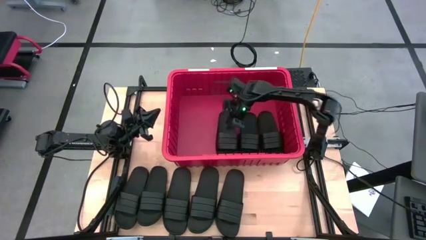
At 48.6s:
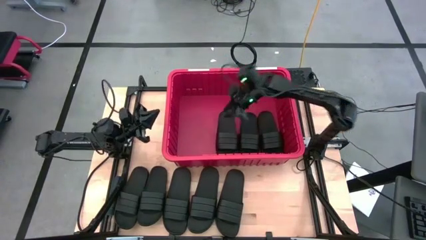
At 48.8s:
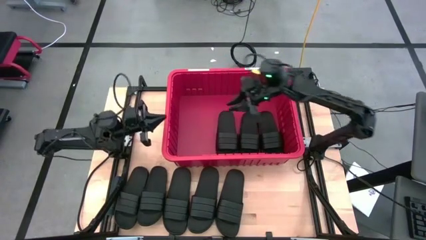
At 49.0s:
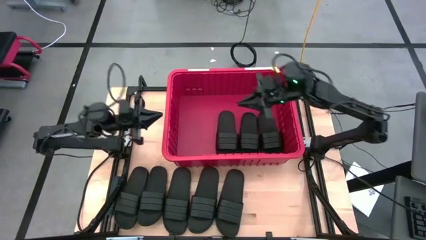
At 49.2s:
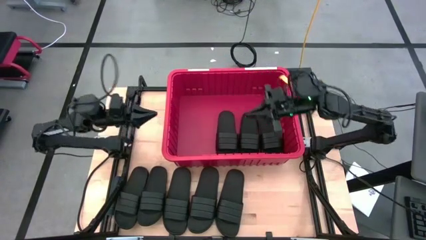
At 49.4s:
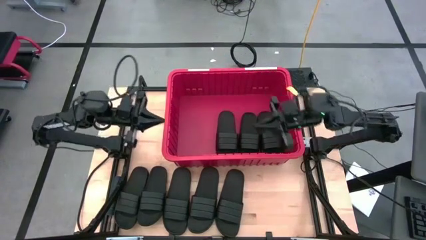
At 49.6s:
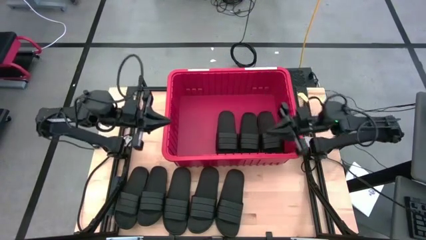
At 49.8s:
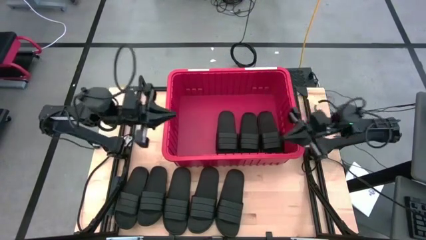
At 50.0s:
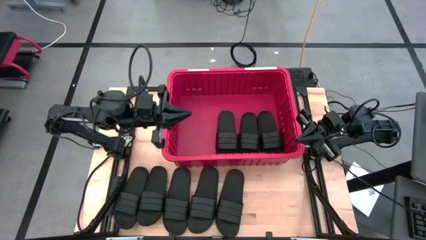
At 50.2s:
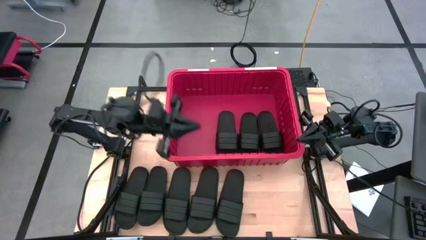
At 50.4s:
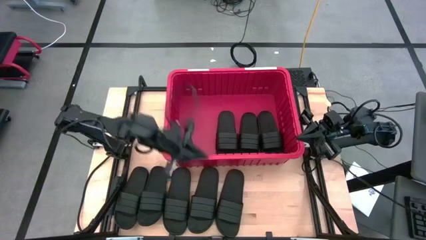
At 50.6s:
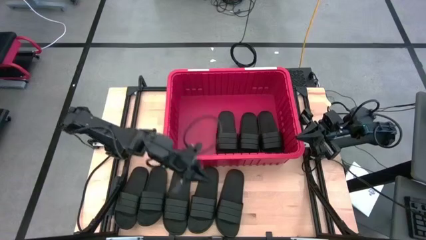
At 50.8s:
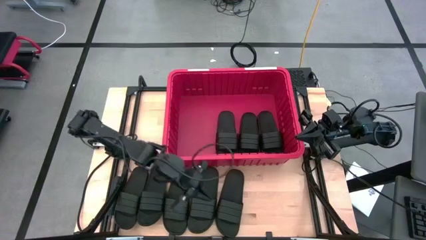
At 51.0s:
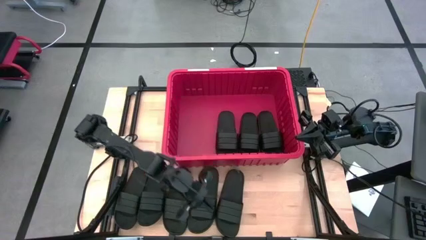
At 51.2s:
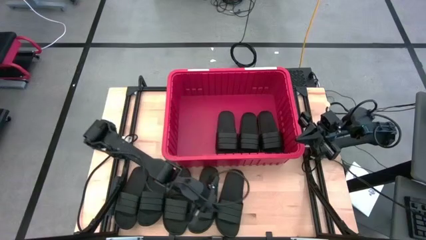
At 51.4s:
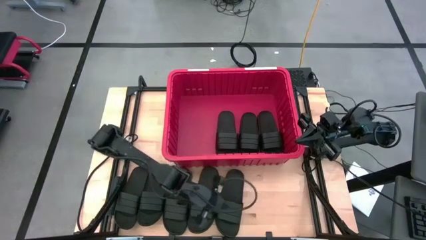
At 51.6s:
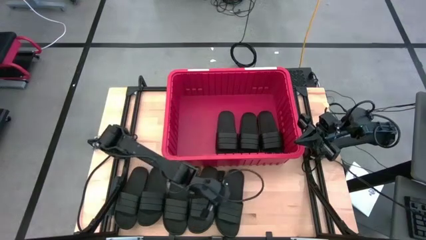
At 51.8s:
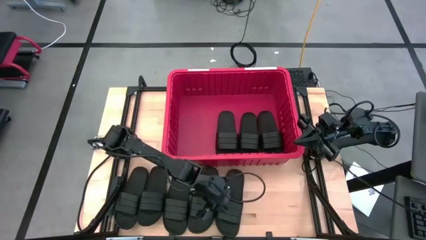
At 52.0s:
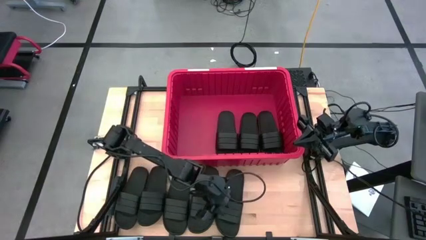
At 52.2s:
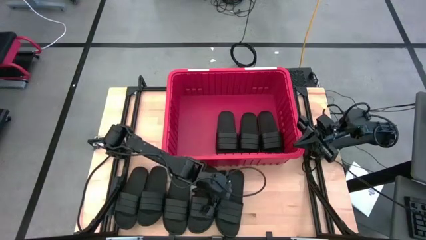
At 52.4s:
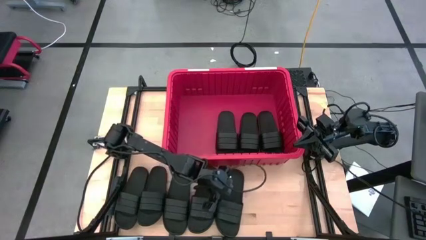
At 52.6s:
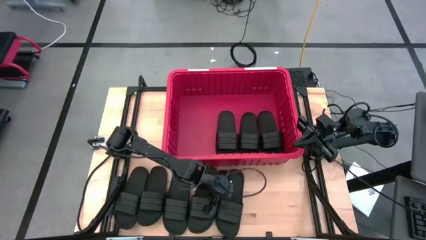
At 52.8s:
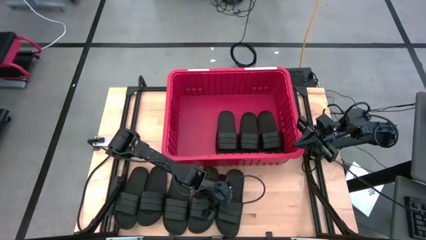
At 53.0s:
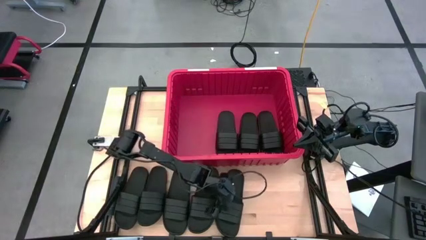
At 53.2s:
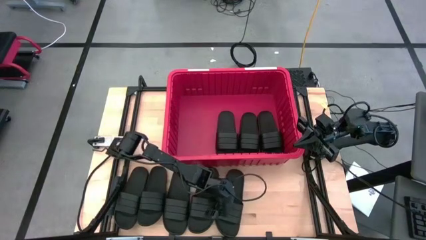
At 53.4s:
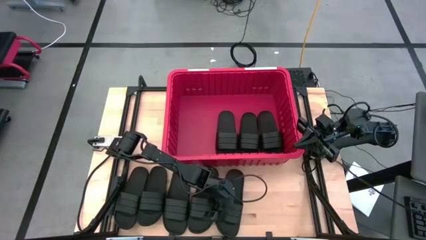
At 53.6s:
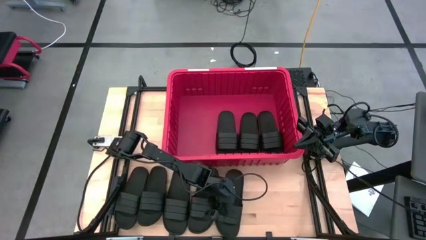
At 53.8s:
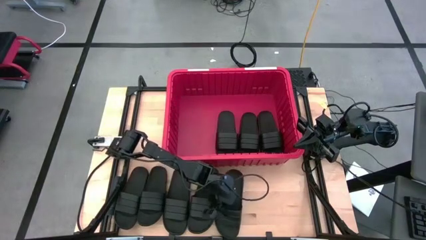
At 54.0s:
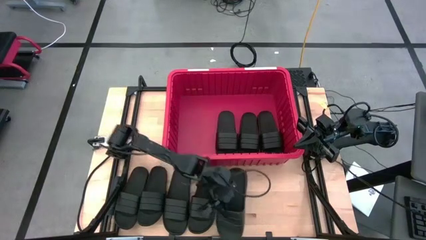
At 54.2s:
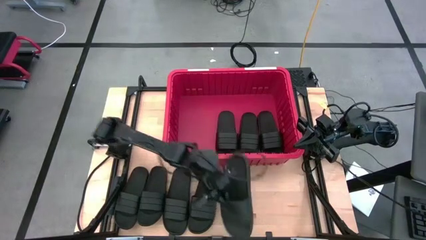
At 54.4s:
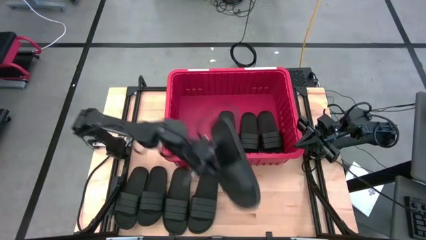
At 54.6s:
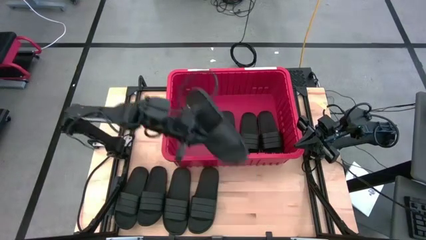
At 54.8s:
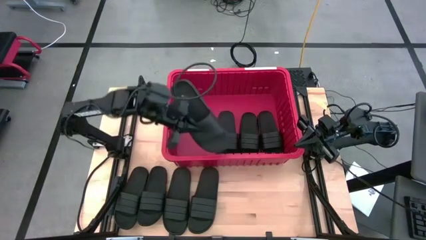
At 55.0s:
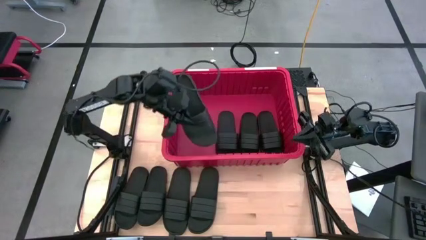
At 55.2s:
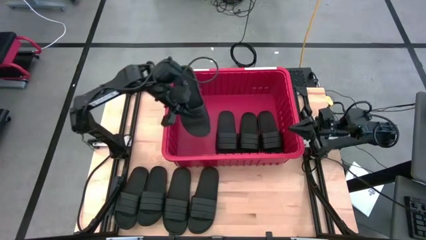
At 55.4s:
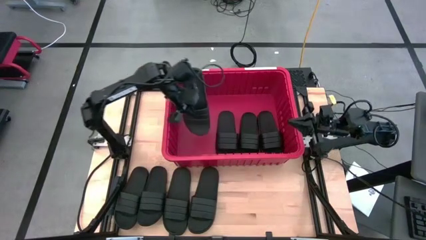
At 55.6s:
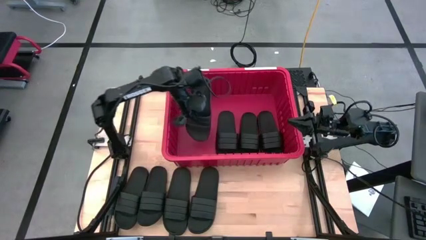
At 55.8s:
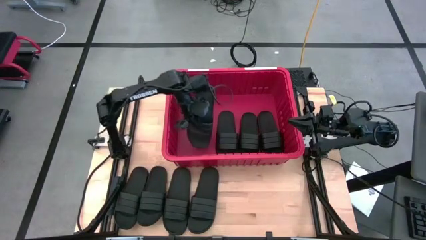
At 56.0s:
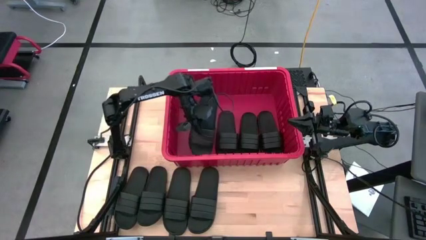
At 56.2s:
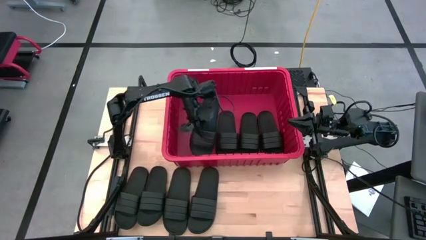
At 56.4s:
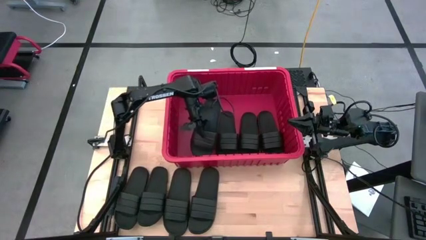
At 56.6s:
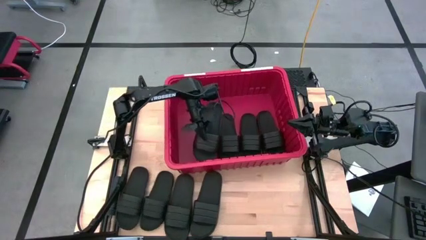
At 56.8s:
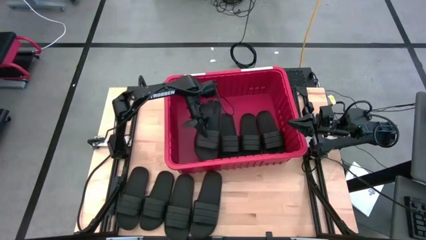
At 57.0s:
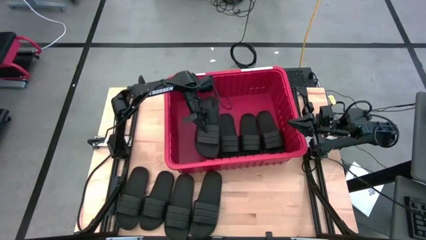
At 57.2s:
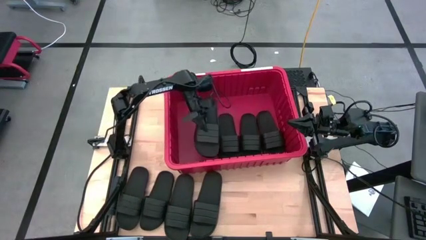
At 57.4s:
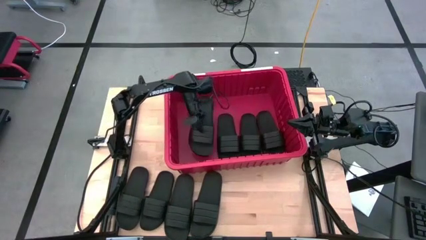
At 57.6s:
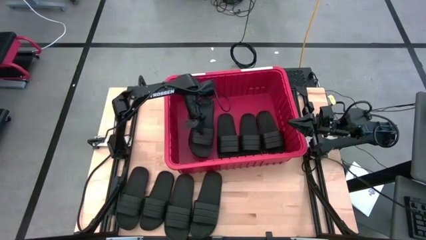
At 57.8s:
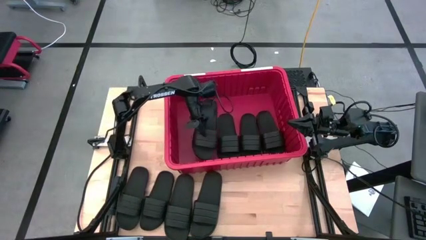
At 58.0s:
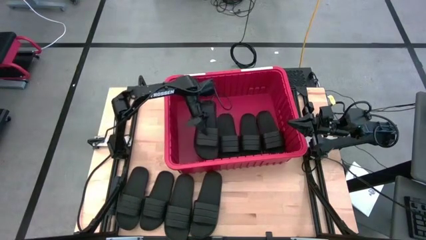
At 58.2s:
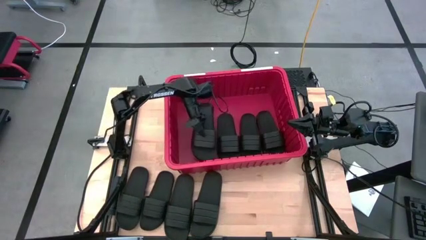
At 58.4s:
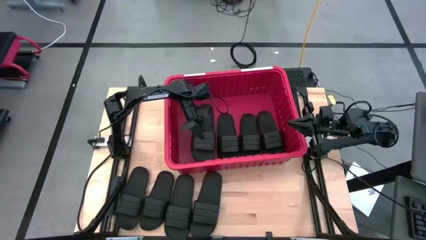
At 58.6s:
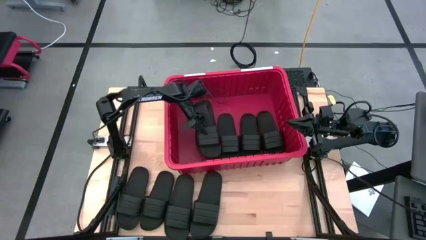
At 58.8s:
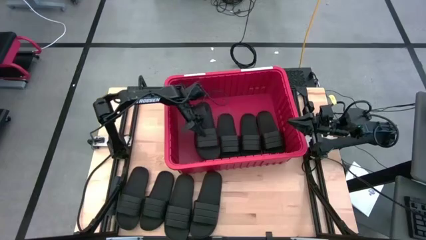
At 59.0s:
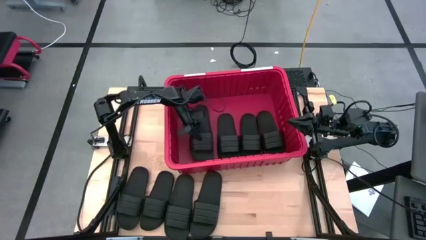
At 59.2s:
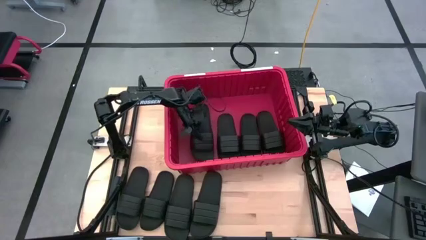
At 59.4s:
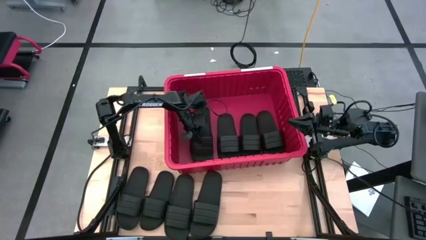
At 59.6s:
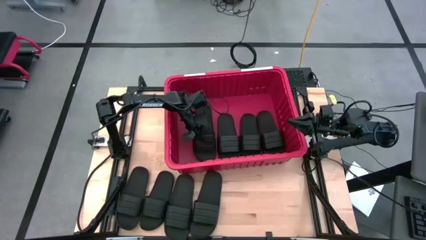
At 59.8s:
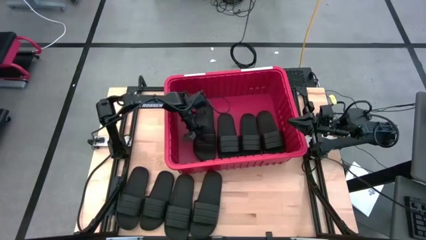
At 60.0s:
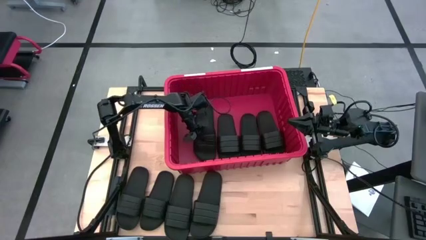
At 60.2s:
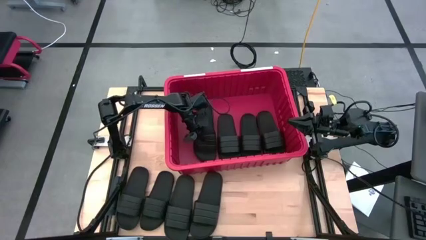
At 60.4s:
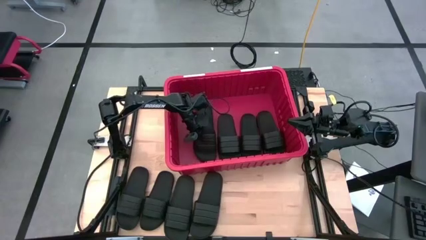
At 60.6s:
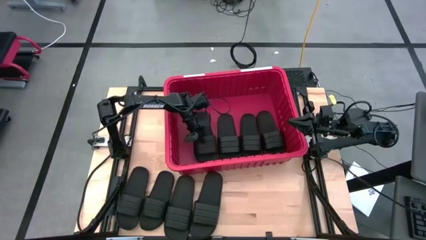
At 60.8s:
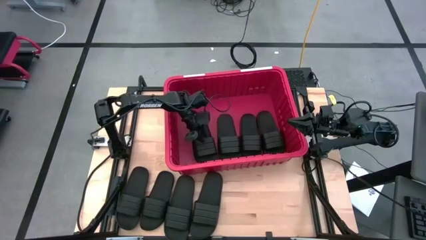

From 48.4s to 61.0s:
Task: Pick and place slides into bin
Put the black slide into the red bin

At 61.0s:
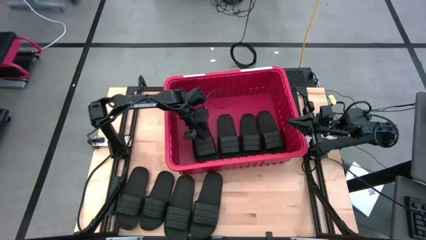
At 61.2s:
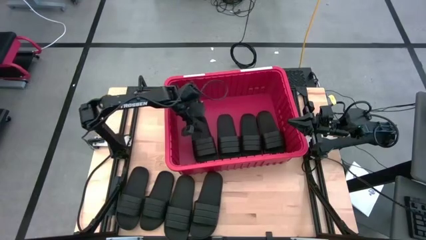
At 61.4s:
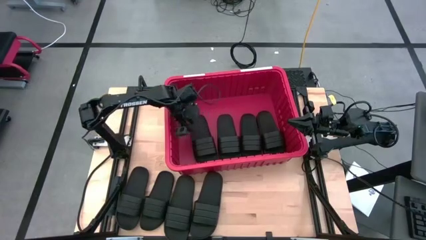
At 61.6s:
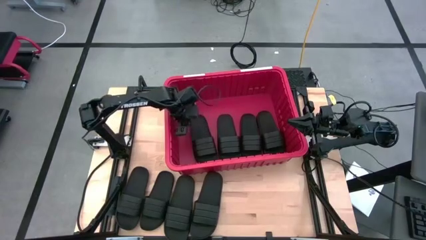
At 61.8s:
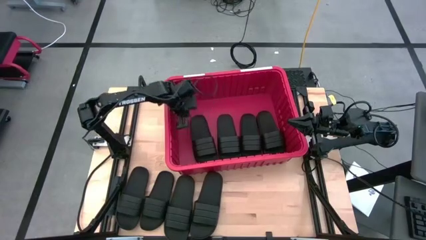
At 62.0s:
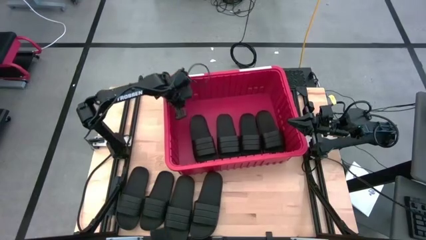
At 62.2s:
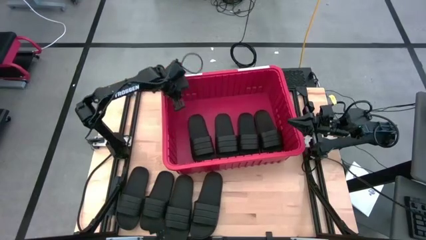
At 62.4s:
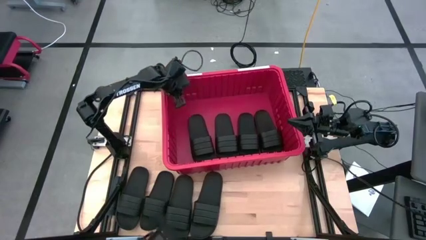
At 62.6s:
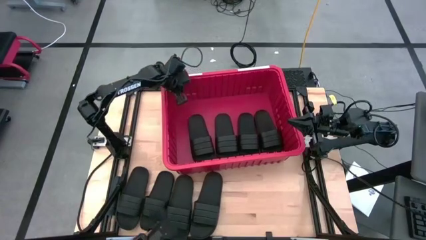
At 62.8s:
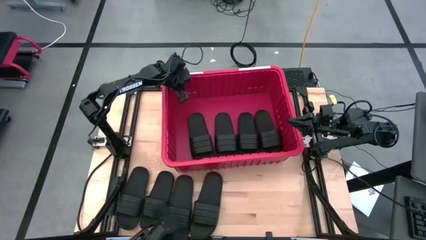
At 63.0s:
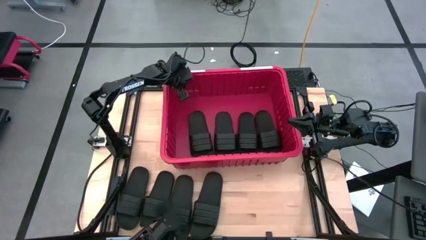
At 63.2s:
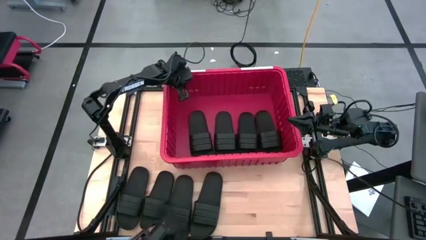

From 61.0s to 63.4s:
Adjust the red bin
